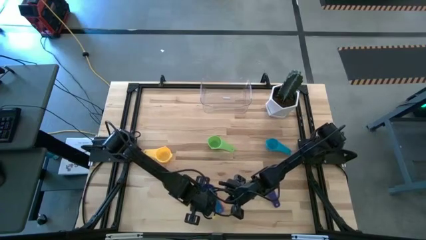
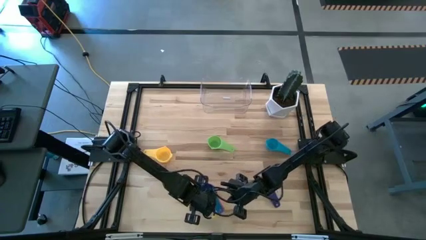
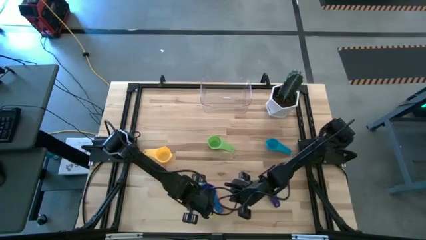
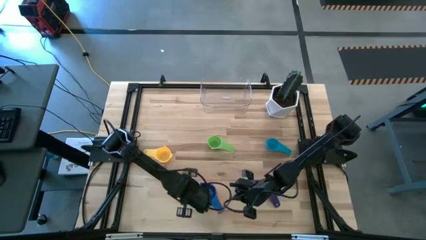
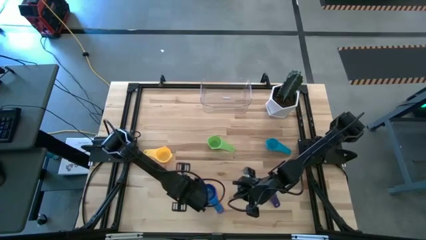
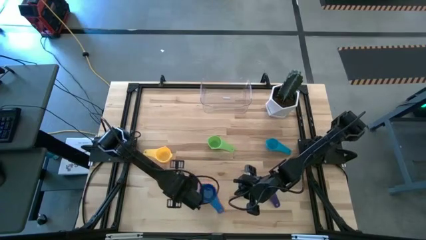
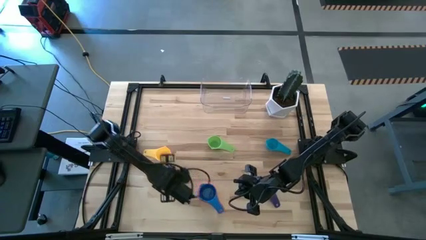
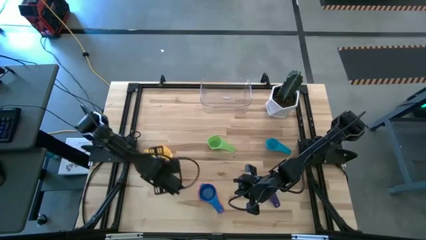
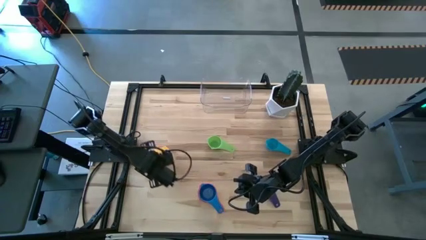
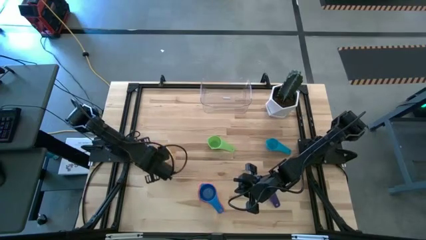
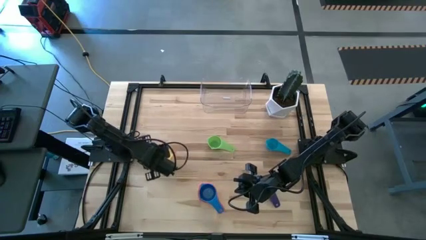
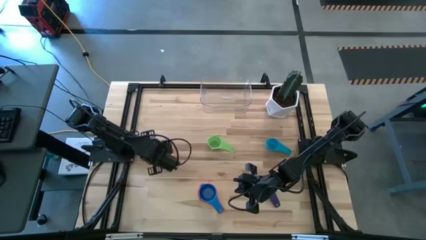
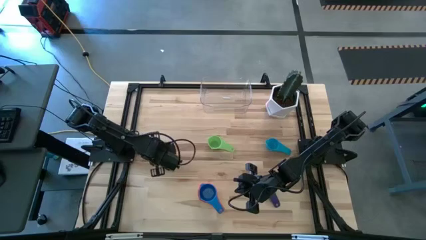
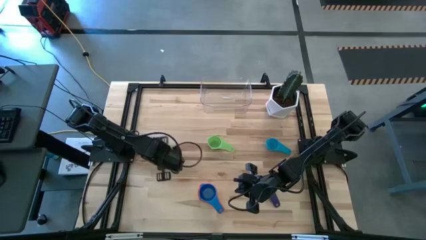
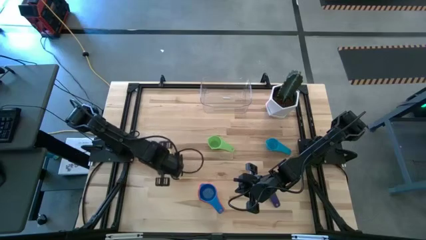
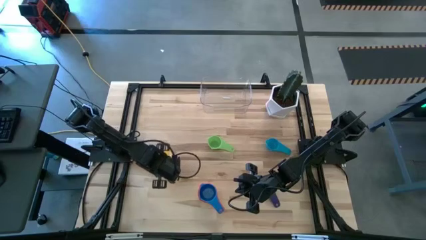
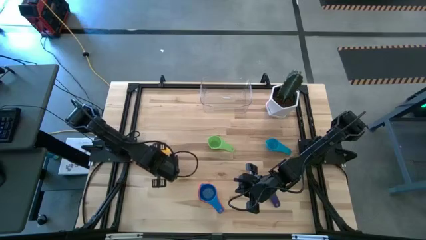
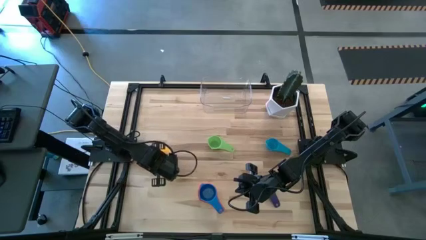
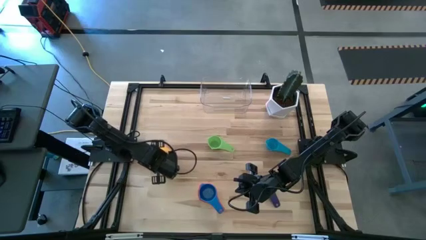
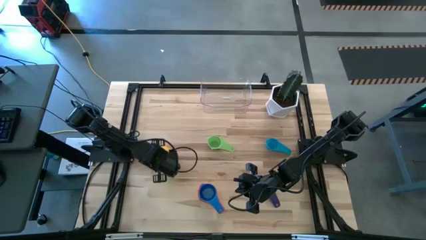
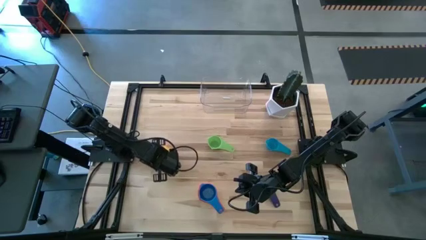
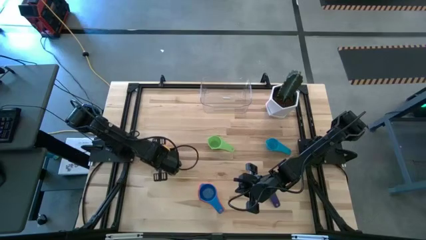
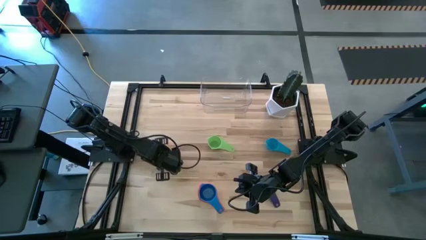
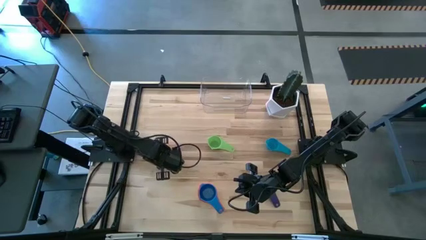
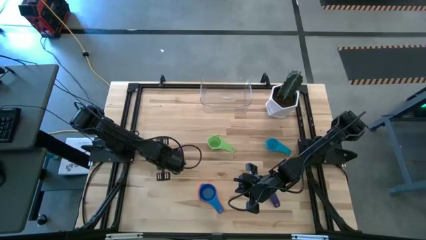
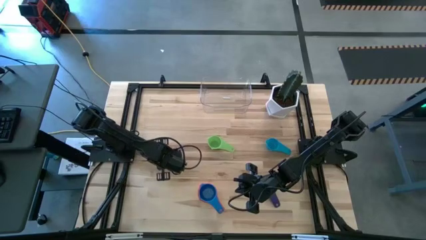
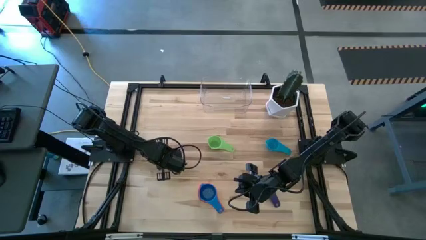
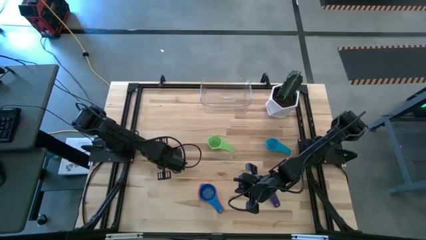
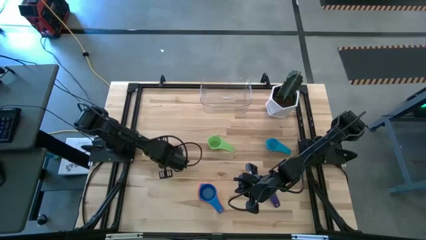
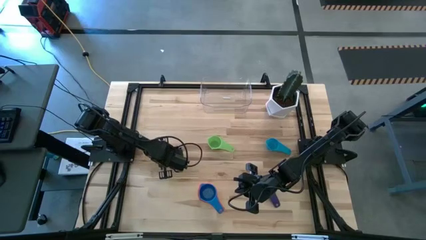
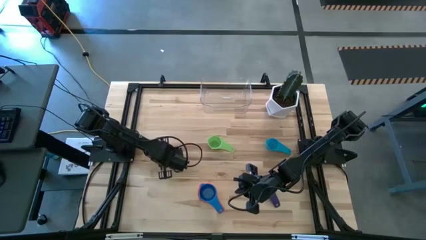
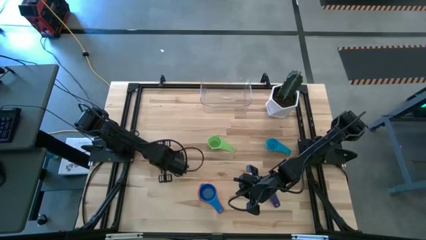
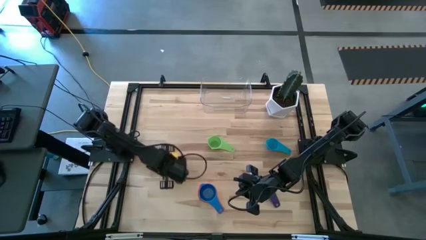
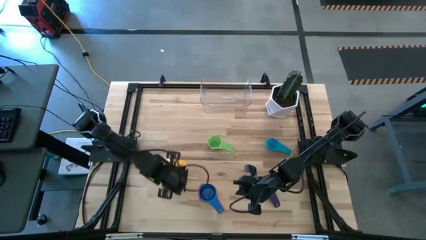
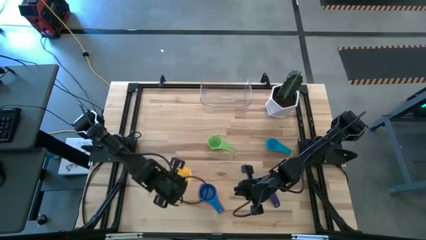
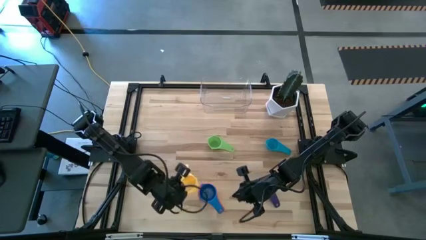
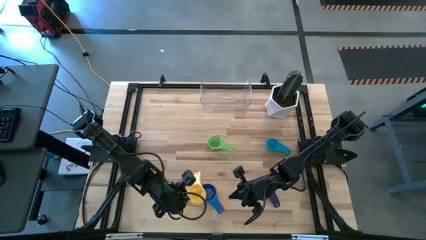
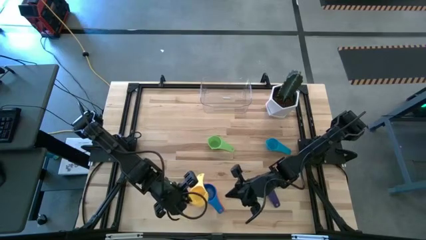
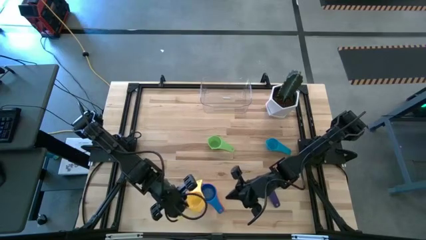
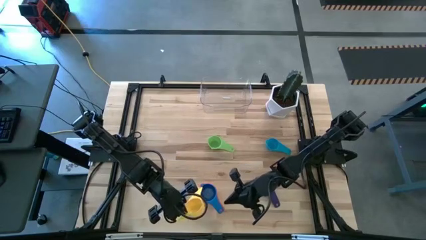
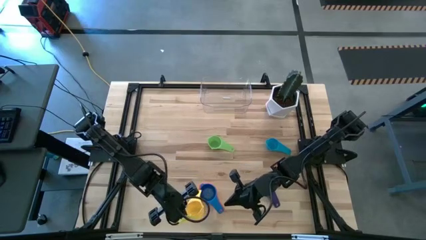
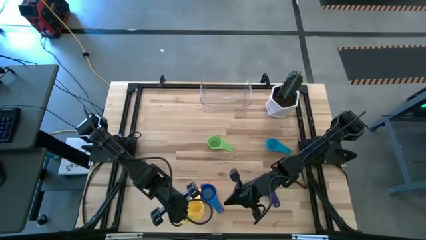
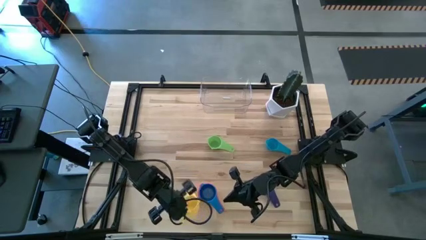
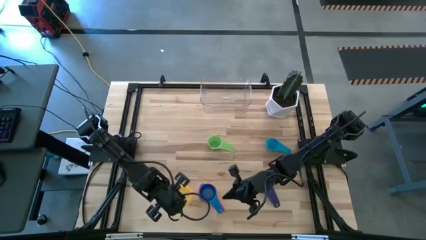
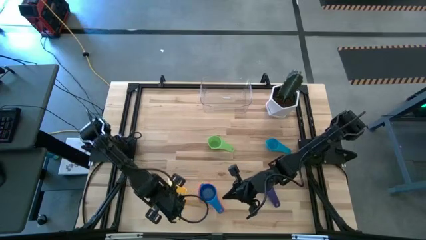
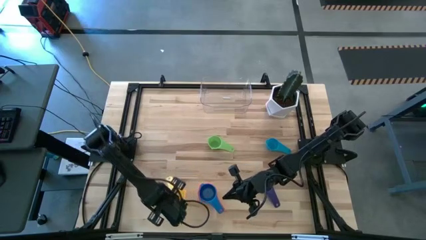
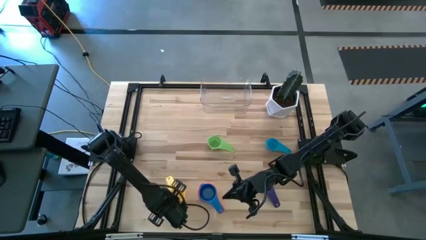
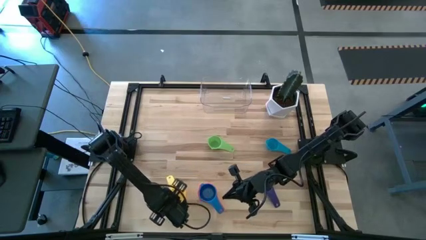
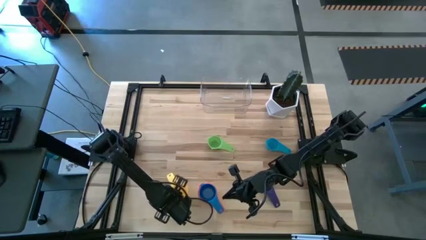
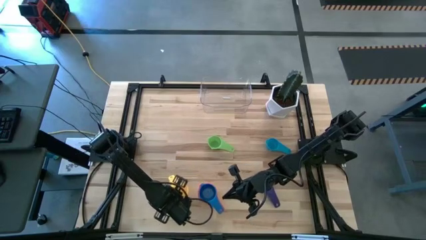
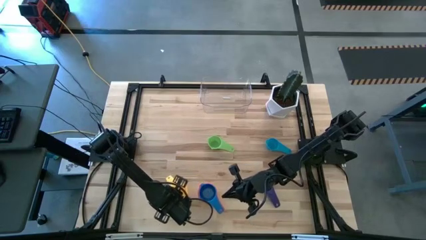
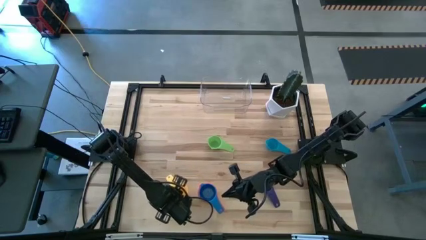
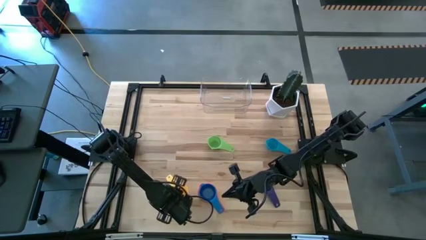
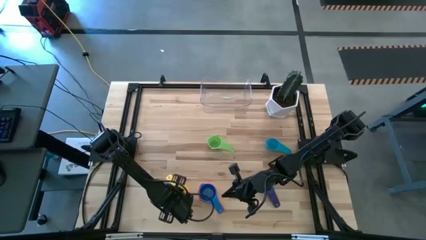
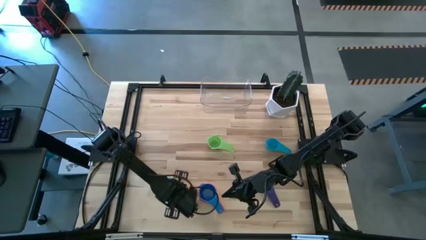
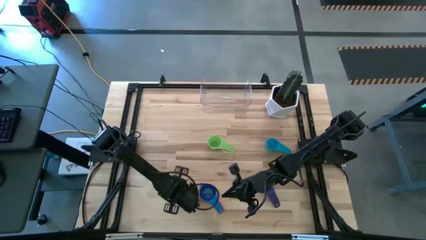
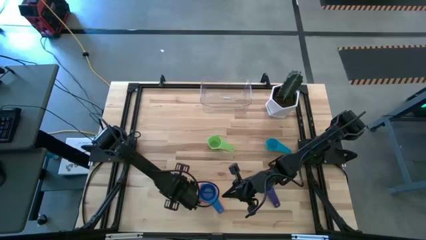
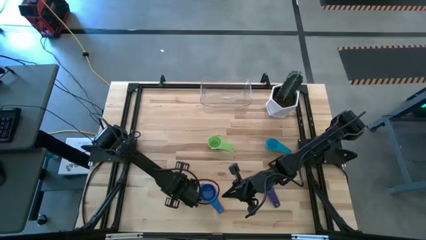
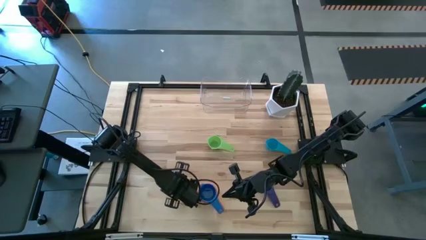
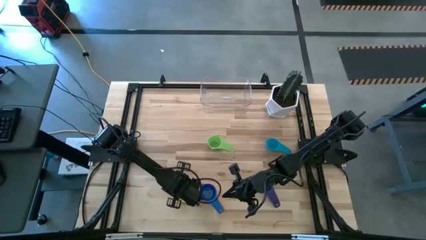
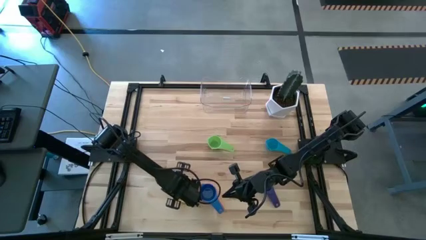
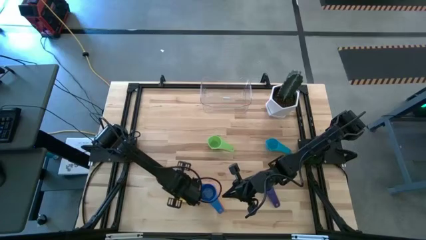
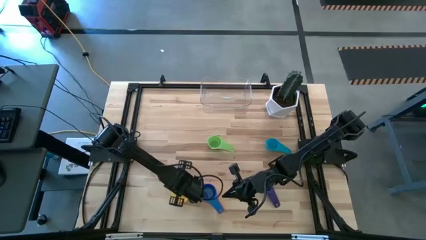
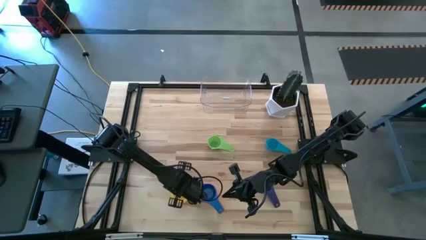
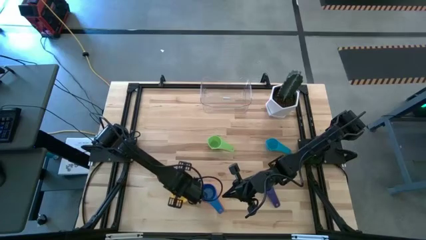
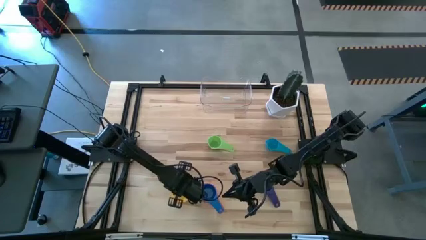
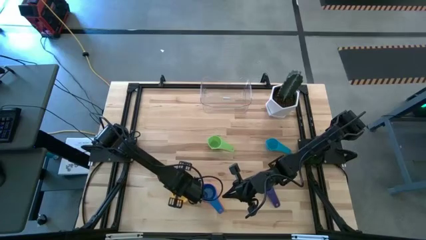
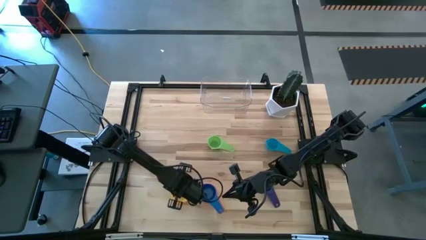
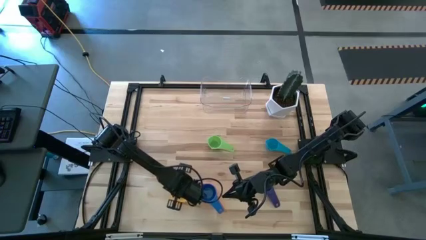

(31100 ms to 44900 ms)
Task: Nest measuring cups in basket
Stack the yellow measuring cup on top of the blue measuring cup
